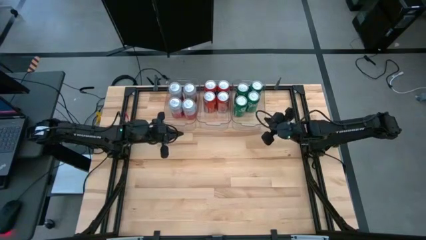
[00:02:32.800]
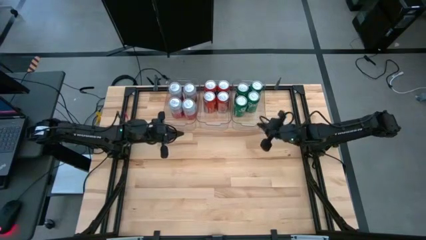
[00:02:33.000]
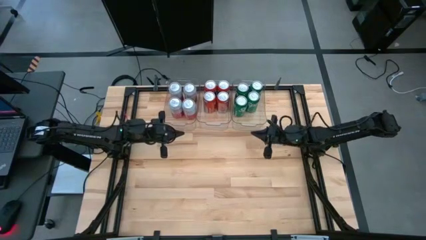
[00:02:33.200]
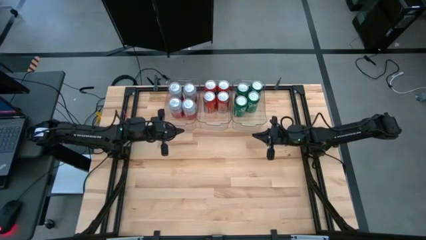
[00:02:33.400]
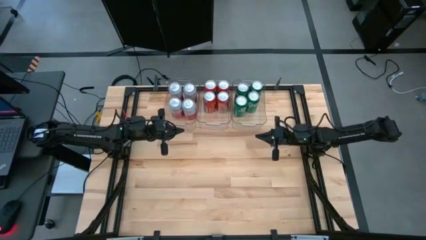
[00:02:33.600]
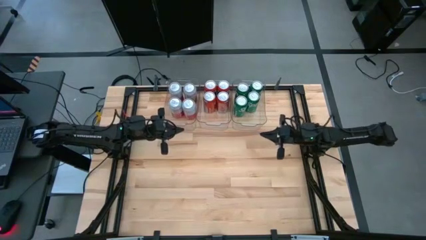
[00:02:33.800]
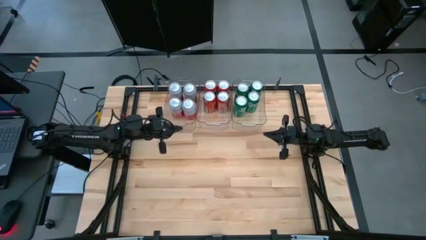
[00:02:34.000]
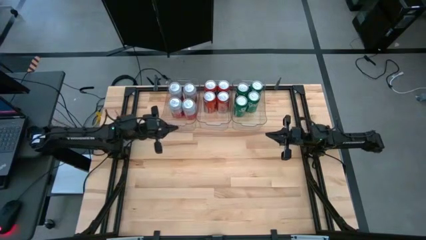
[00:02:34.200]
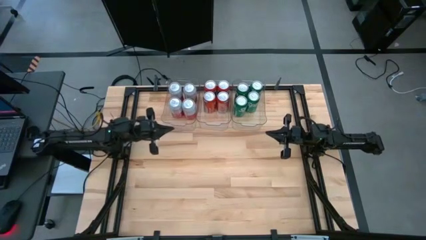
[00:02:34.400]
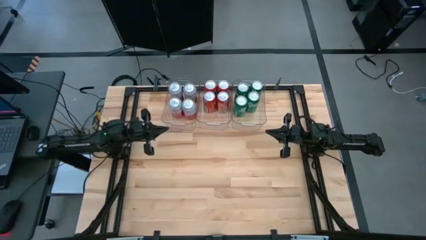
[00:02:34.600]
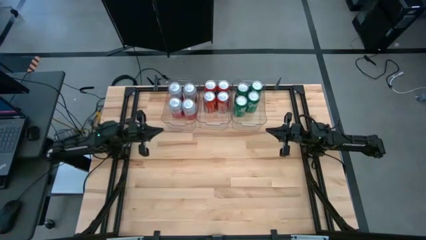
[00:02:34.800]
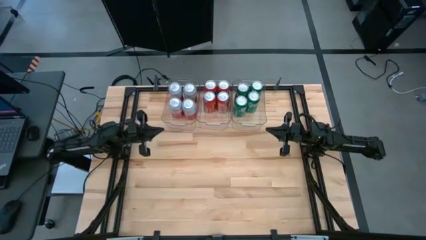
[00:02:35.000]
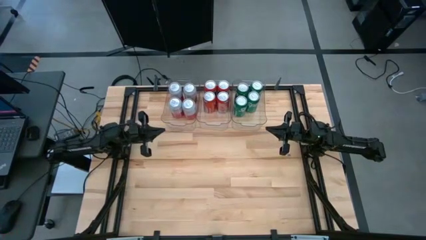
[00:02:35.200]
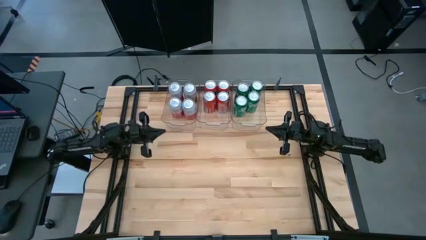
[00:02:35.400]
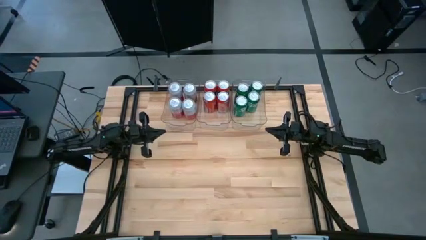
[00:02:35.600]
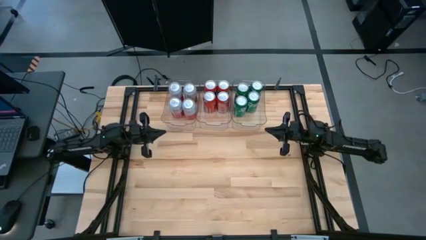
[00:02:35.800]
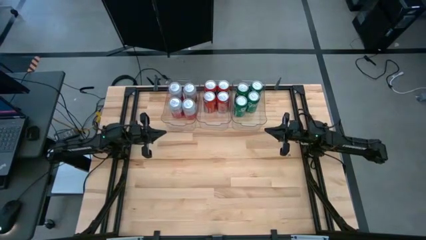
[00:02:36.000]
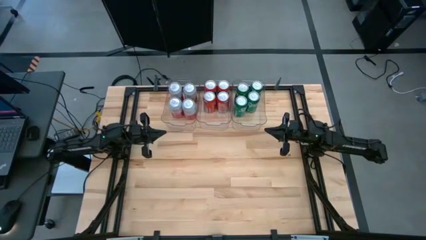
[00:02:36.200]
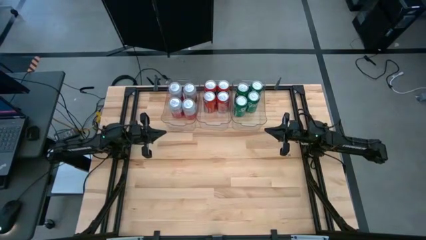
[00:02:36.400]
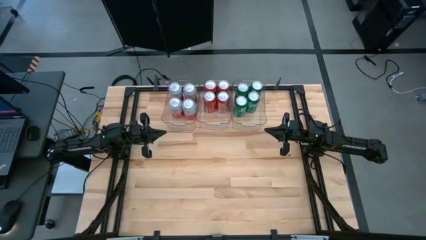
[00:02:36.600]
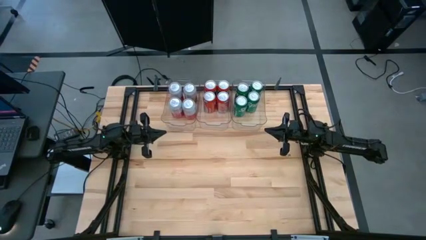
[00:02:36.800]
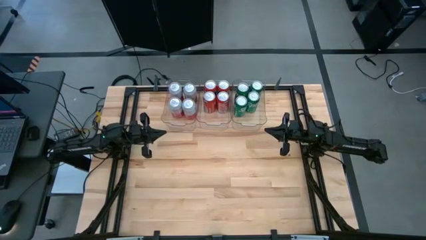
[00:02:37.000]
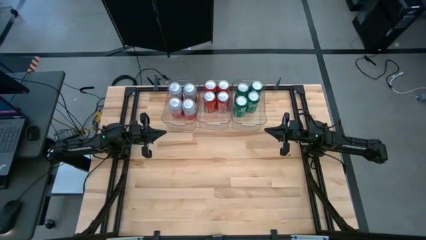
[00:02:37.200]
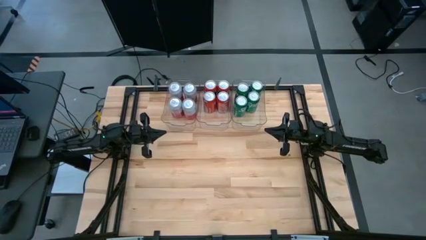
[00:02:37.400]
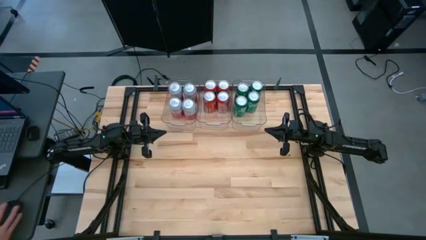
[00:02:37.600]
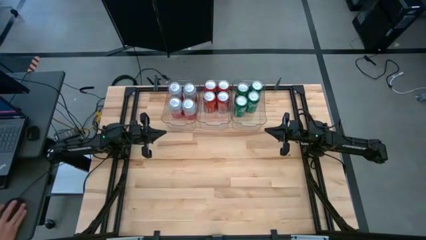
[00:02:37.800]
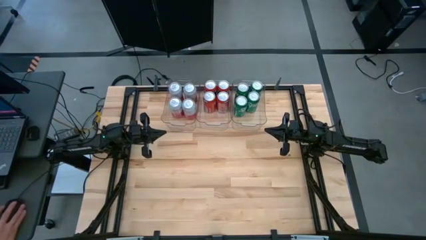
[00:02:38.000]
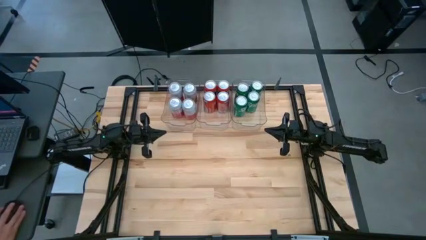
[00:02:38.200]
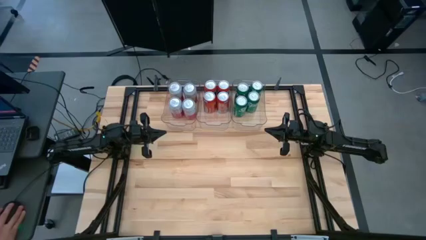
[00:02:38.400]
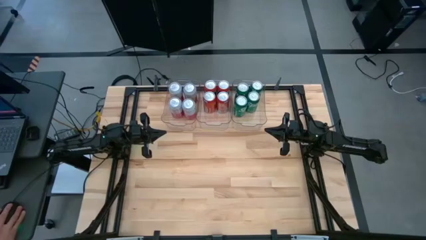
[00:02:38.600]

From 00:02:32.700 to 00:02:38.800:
Task: Sort soda cans
Return to Home Position

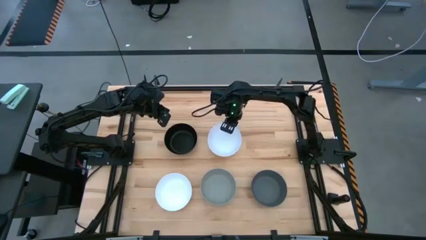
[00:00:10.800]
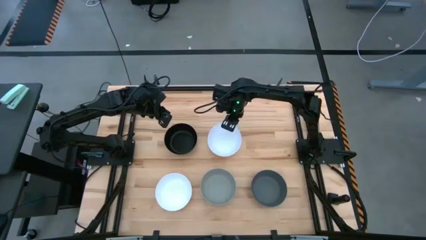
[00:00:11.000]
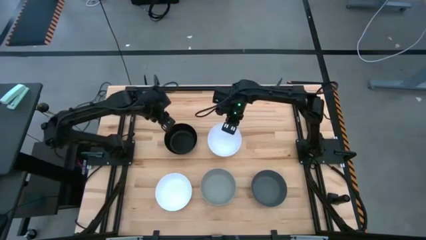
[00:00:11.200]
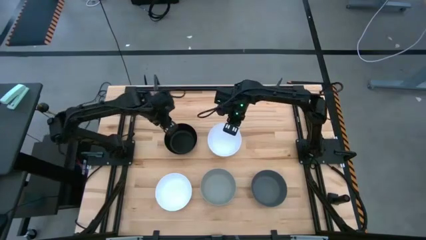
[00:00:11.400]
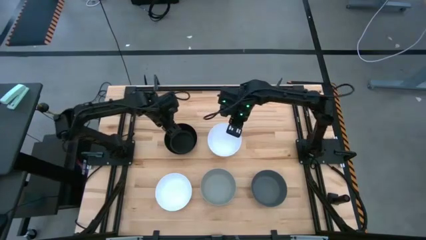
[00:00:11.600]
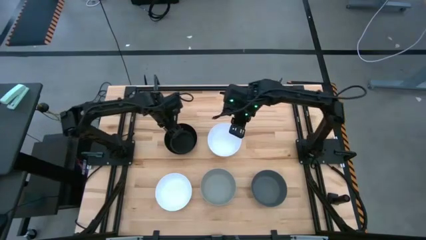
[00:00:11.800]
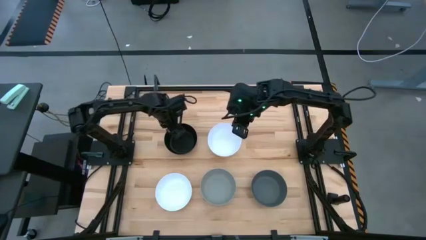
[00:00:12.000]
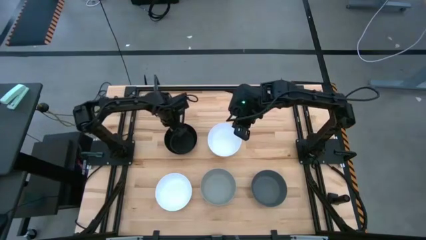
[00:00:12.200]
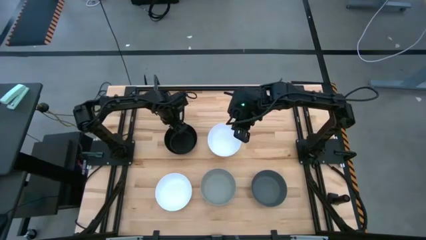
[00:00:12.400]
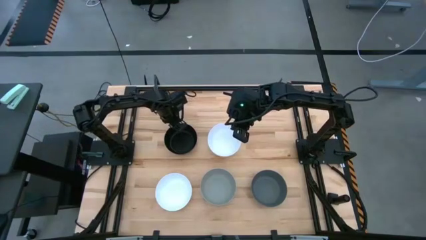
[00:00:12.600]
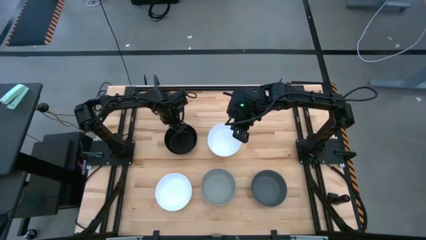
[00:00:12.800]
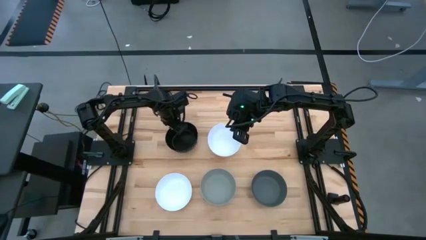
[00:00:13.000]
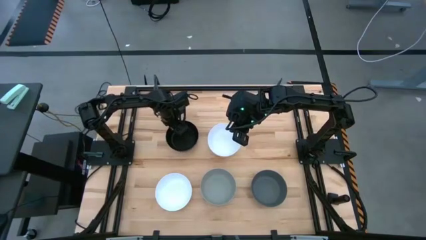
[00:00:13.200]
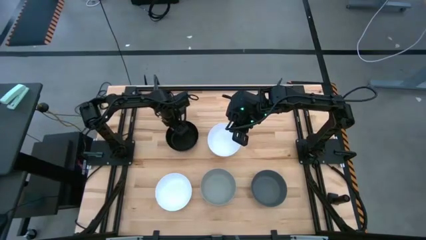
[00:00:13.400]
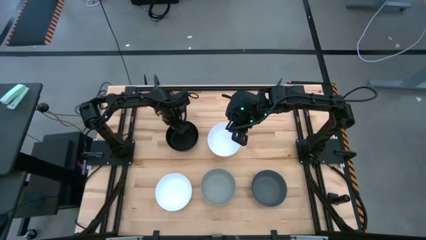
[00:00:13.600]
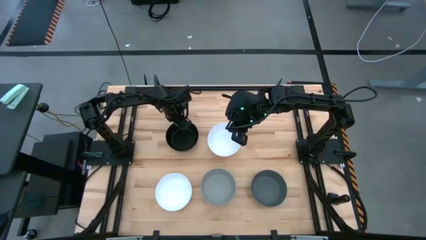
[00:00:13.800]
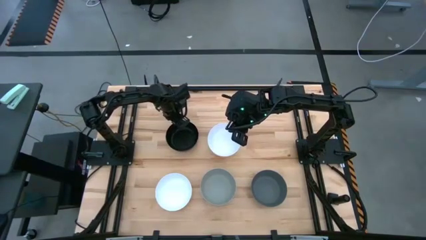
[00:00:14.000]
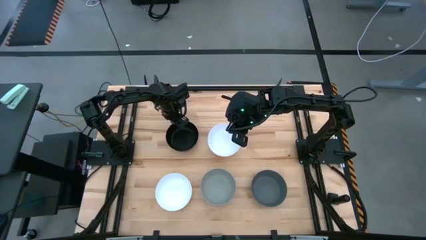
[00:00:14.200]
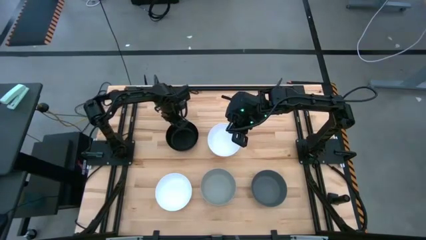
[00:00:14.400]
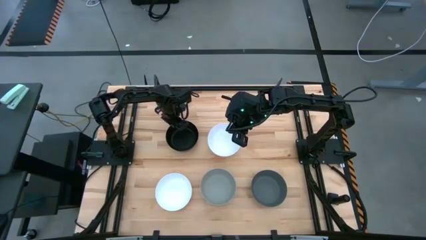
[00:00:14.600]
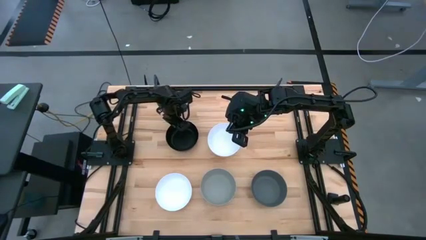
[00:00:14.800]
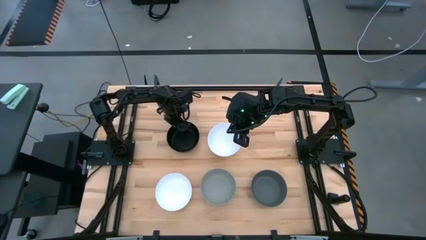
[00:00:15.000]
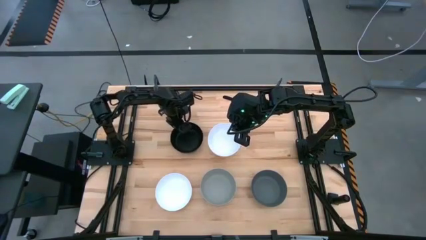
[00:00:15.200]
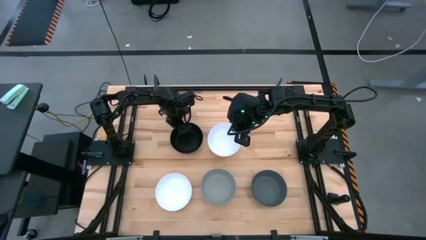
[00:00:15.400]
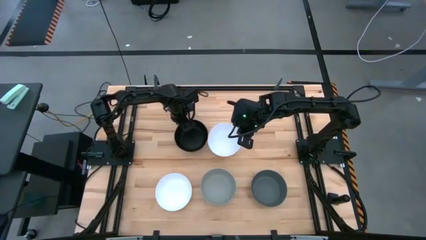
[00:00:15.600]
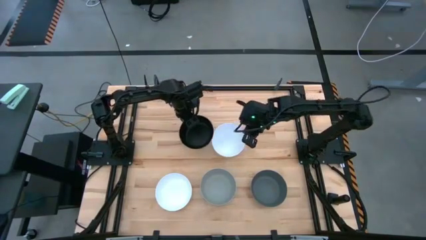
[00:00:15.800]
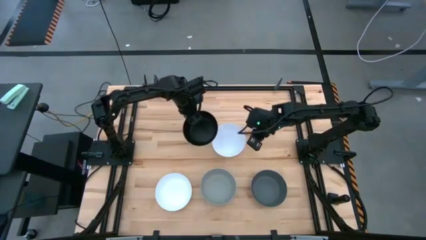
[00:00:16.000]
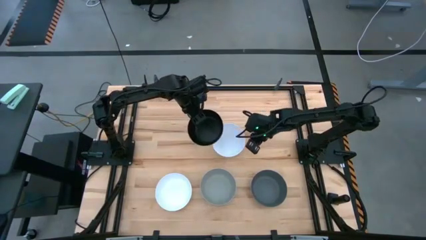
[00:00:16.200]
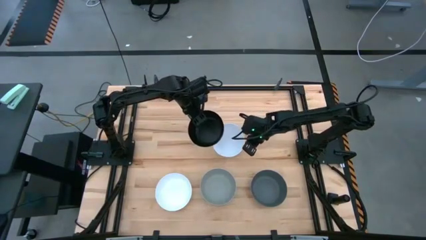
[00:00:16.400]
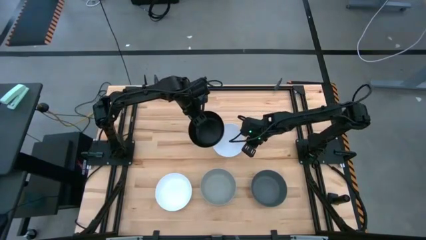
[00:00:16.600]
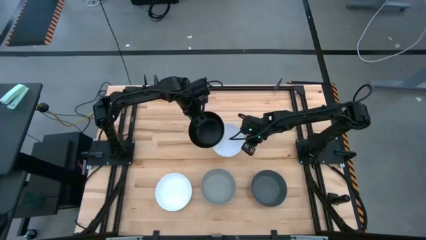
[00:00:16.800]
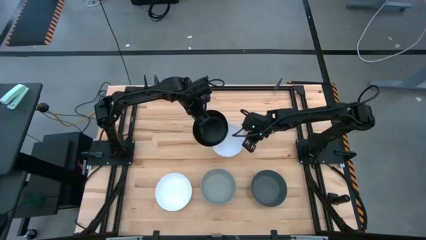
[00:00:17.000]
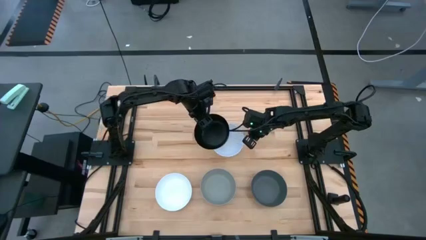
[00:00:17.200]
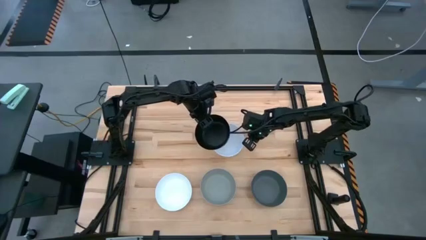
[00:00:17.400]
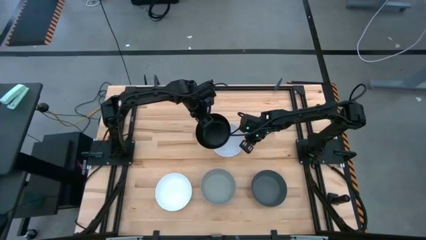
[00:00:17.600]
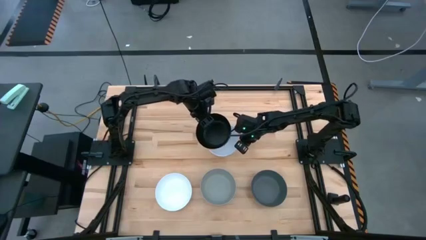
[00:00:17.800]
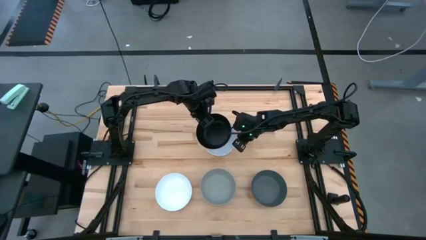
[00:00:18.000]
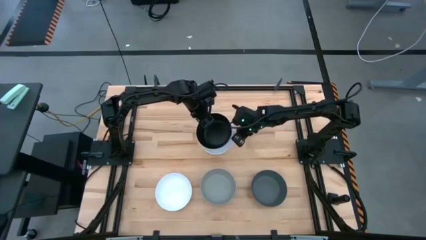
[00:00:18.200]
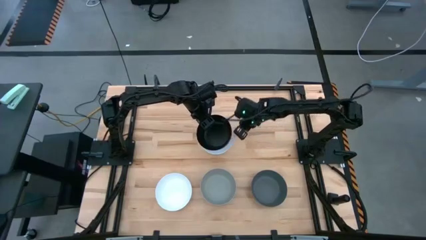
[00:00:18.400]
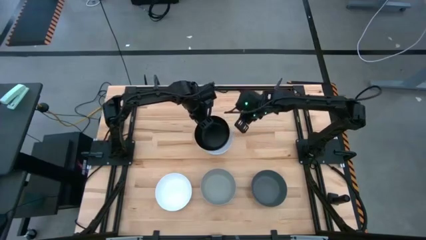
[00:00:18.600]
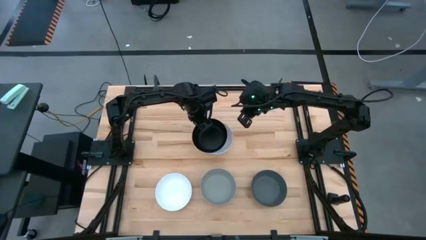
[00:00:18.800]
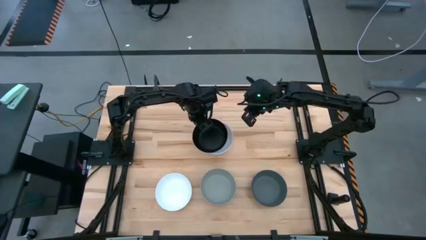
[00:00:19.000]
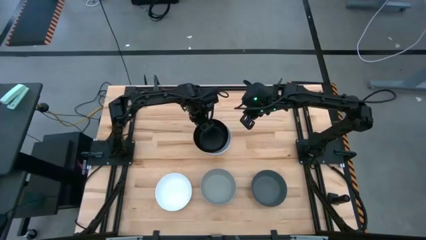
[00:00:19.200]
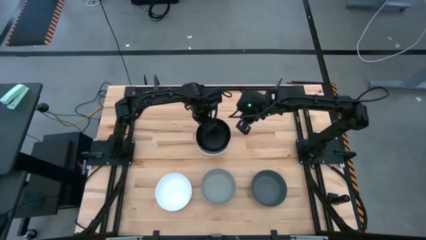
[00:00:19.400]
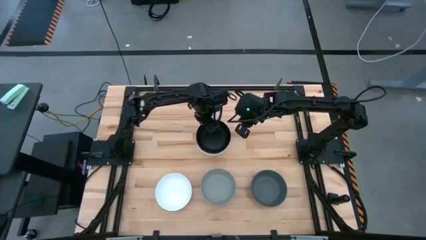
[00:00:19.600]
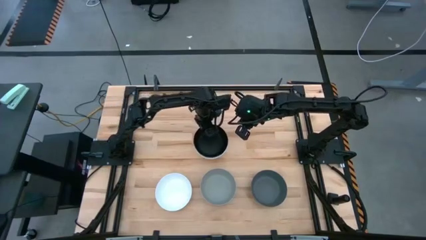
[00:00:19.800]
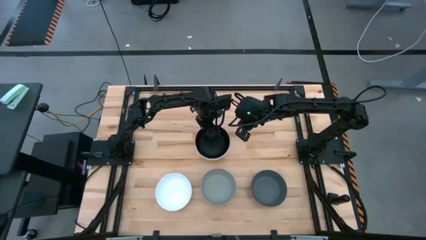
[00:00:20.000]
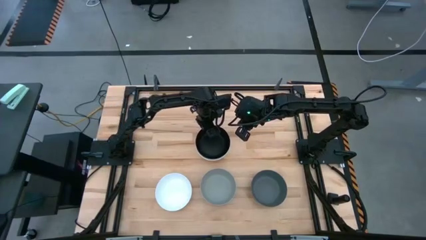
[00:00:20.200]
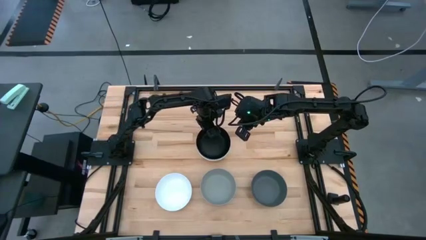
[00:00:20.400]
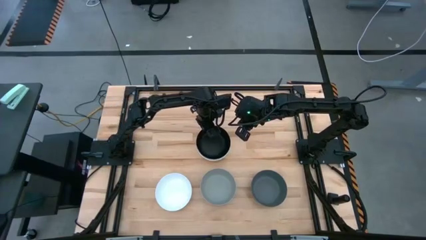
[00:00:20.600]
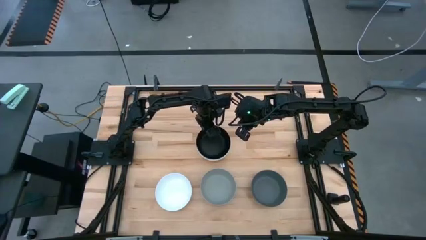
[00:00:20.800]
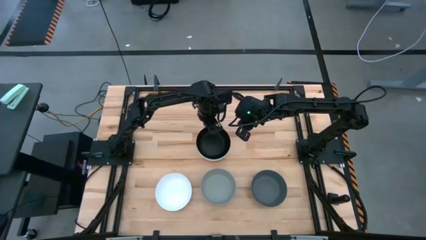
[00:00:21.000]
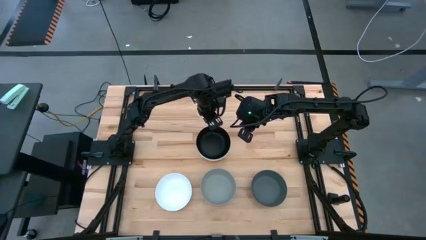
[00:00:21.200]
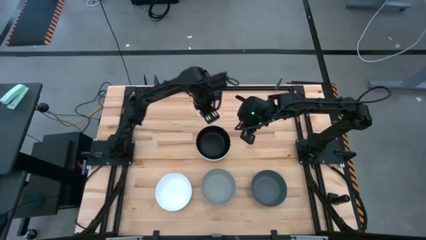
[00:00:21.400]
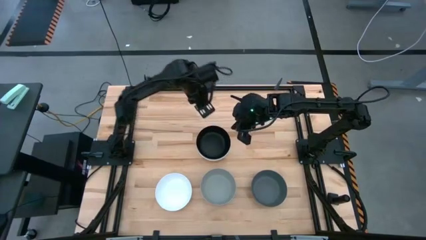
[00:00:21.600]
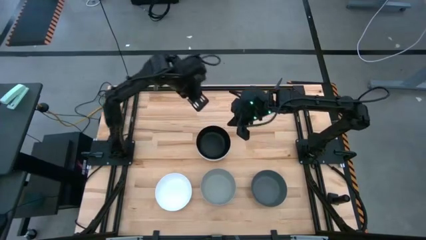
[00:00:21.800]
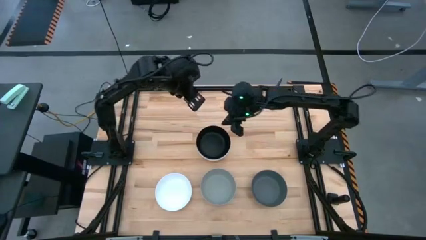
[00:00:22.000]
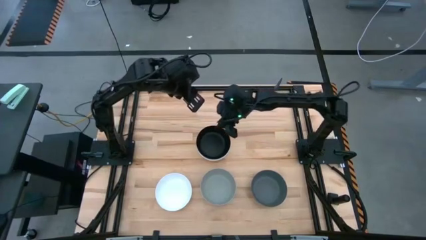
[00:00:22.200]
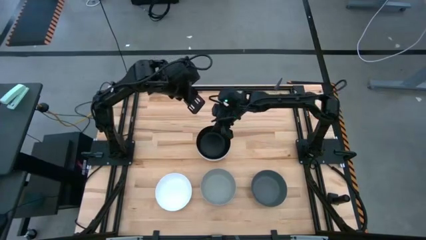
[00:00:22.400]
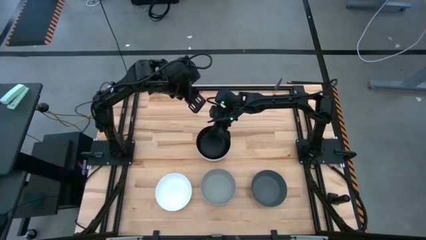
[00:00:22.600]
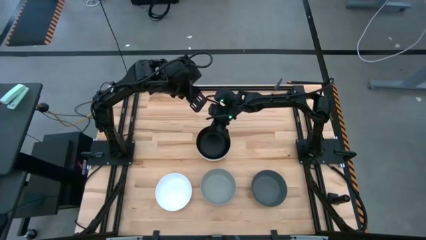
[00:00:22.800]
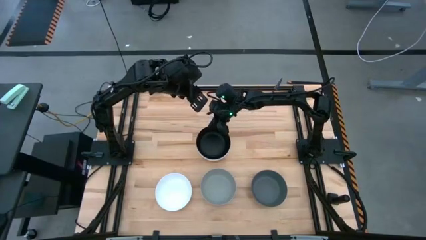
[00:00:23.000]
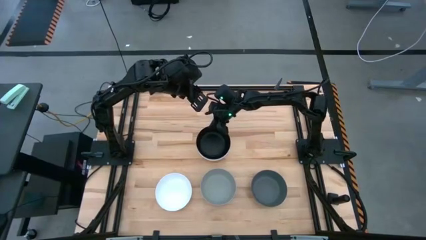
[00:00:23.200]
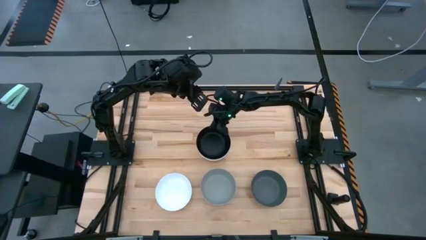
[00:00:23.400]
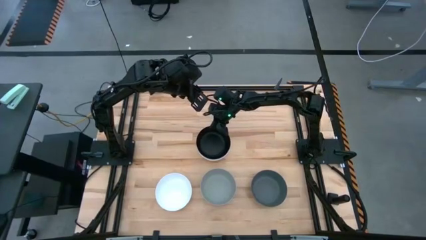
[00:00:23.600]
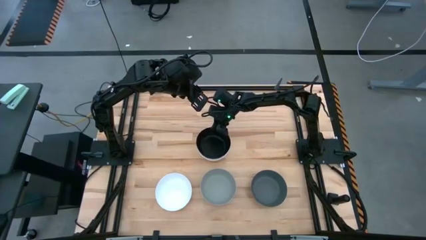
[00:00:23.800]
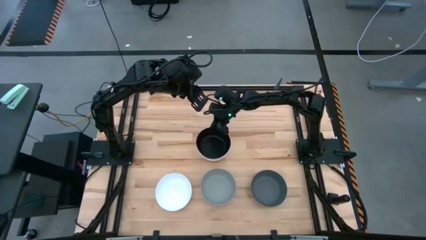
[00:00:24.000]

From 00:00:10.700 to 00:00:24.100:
Task: Nest bowls inside each other
Stack the black bowl on top of the white bowl
